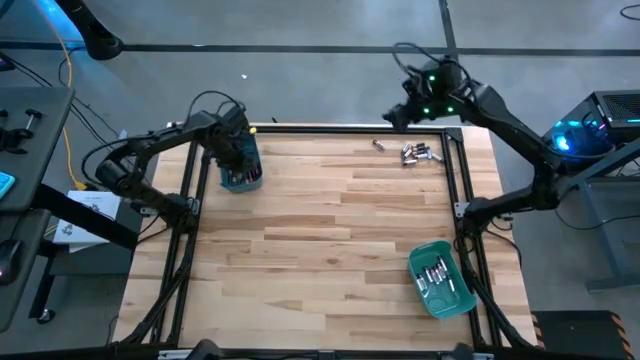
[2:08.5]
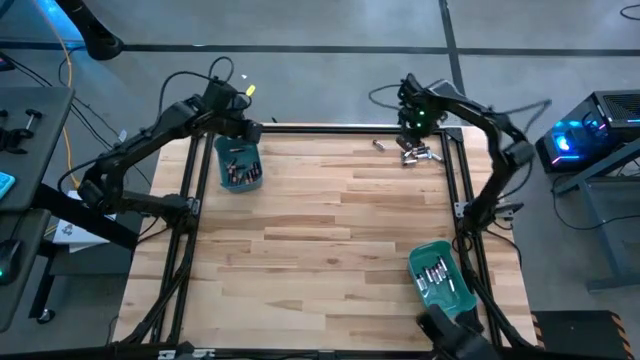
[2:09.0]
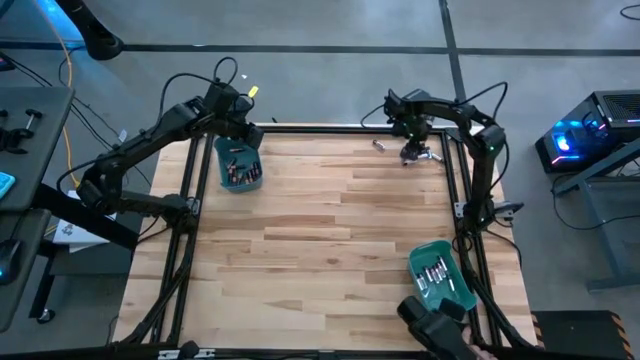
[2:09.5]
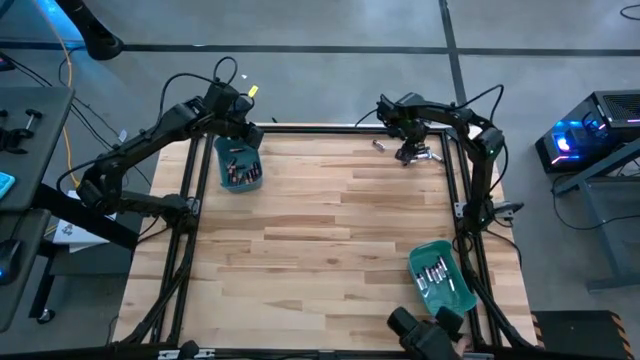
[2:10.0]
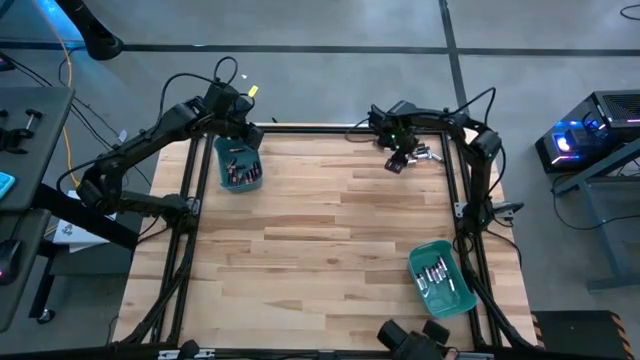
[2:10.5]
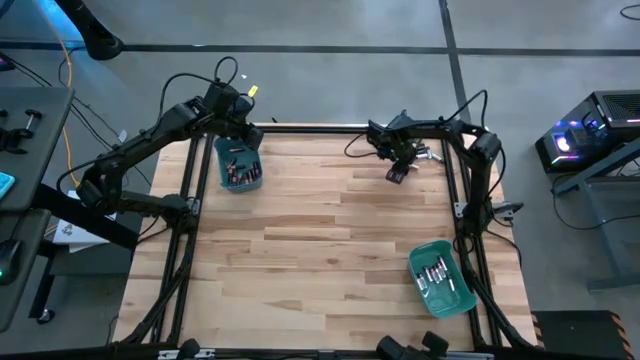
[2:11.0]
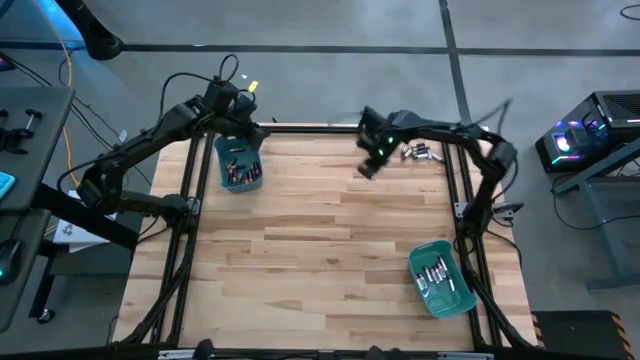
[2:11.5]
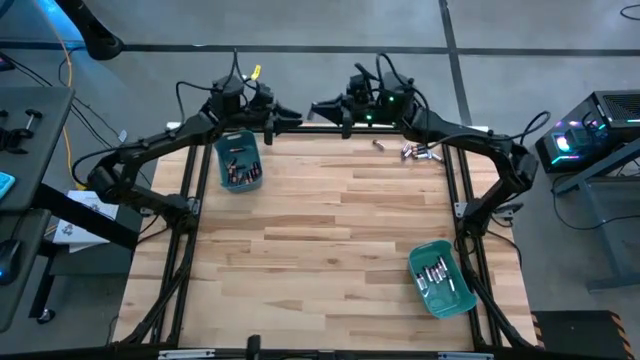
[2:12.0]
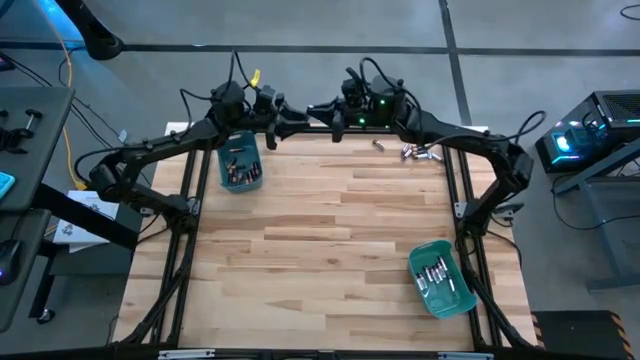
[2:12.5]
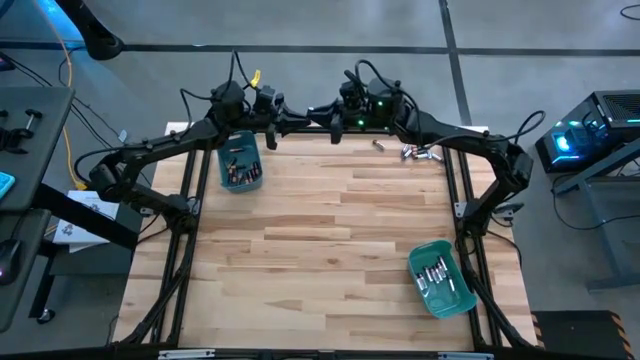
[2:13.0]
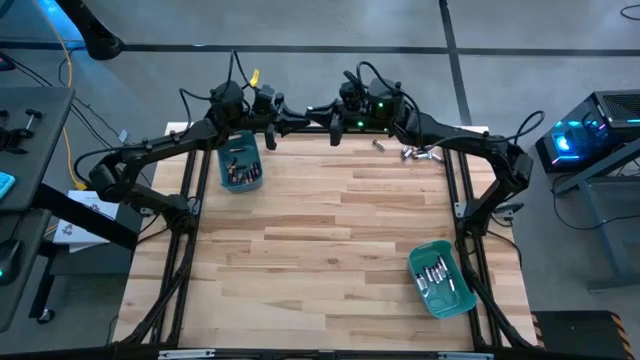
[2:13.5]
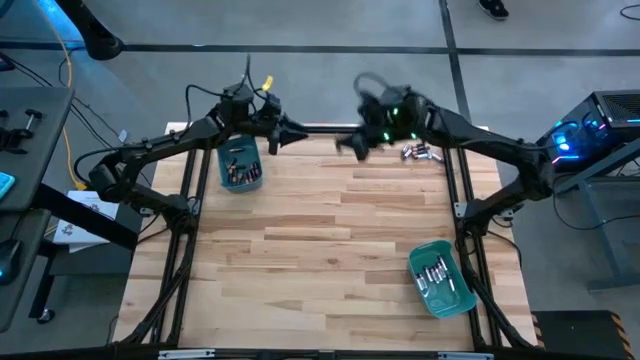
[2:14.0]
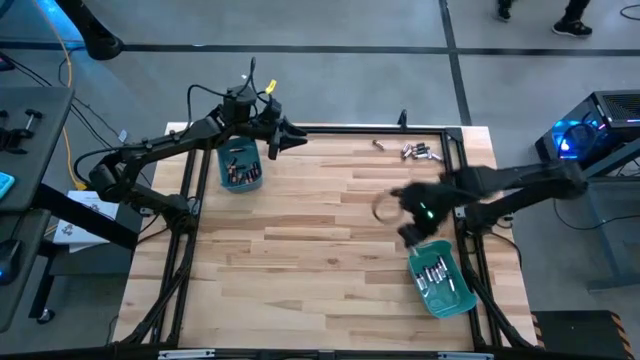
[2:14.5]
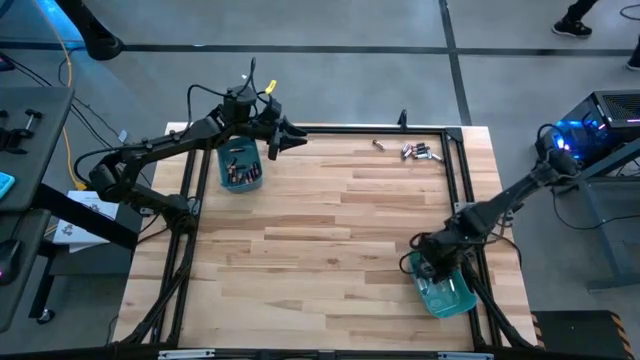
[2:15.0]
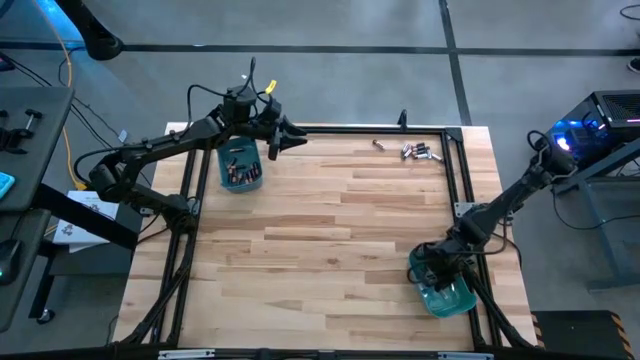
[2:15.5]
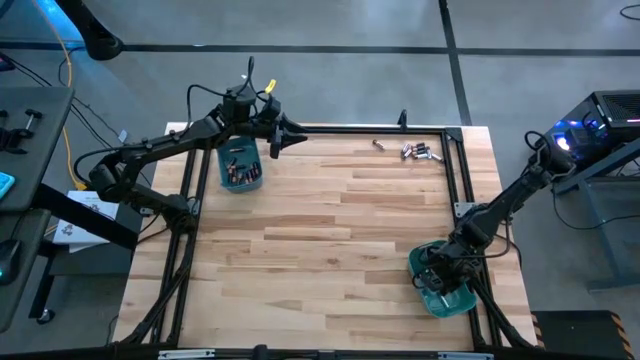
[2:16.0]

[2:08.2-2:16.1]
Task: Sort batteries
Put the silver battery into the green bin

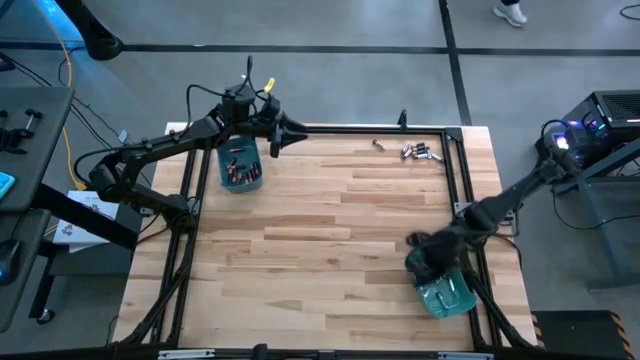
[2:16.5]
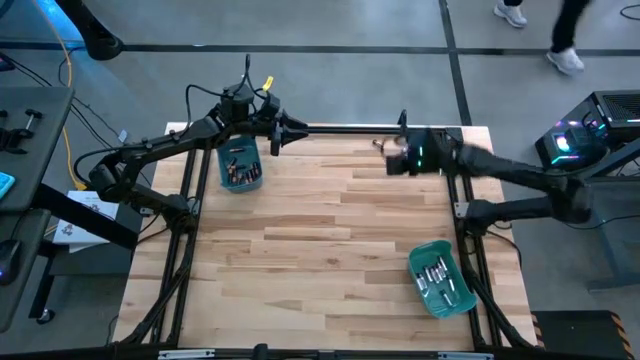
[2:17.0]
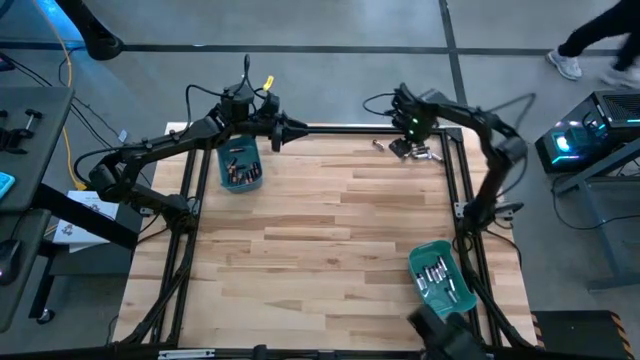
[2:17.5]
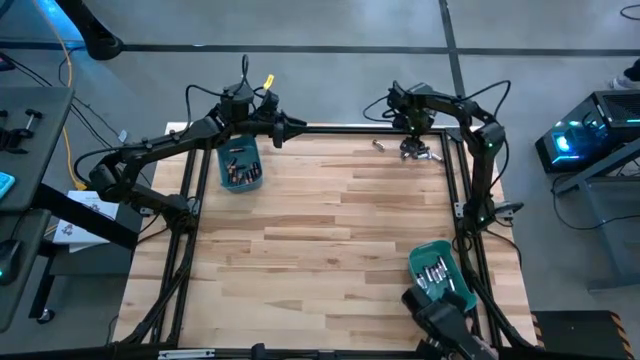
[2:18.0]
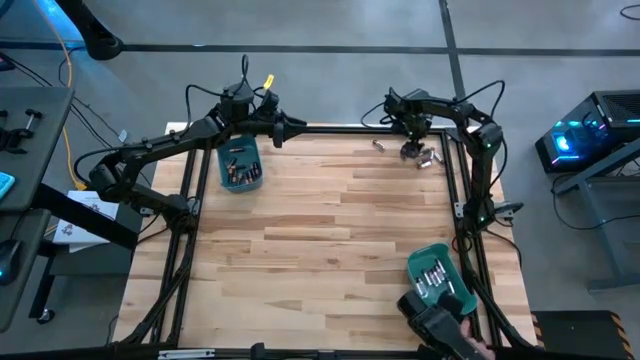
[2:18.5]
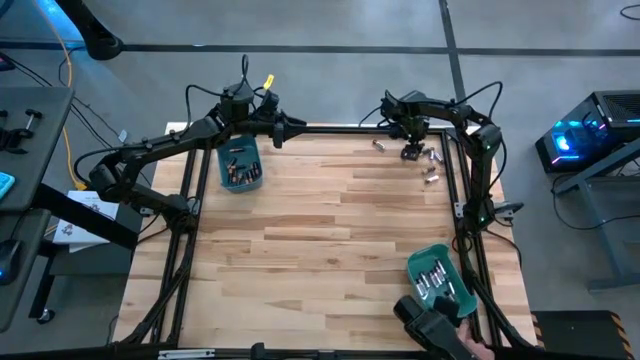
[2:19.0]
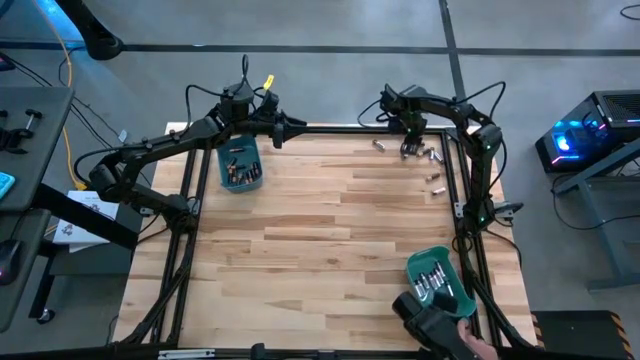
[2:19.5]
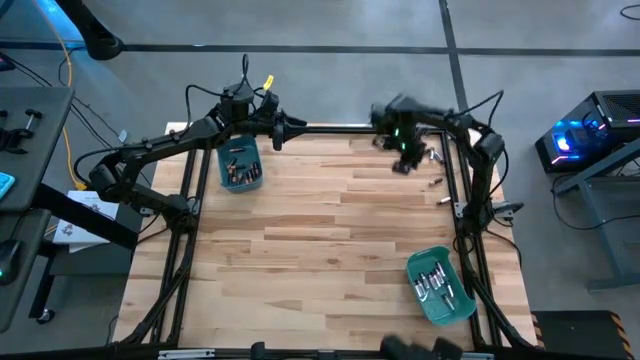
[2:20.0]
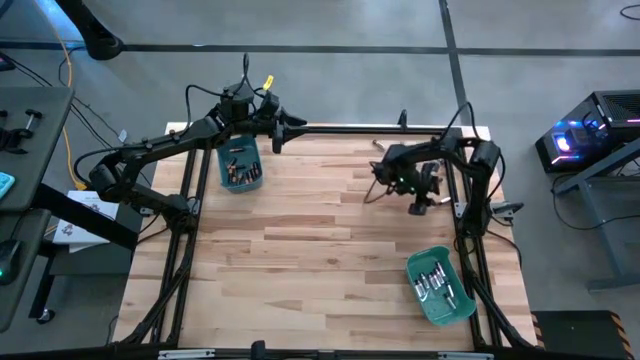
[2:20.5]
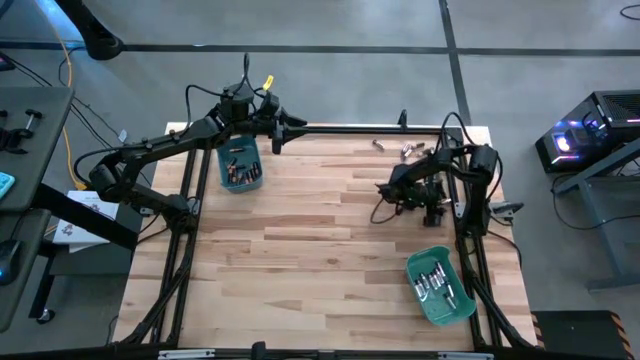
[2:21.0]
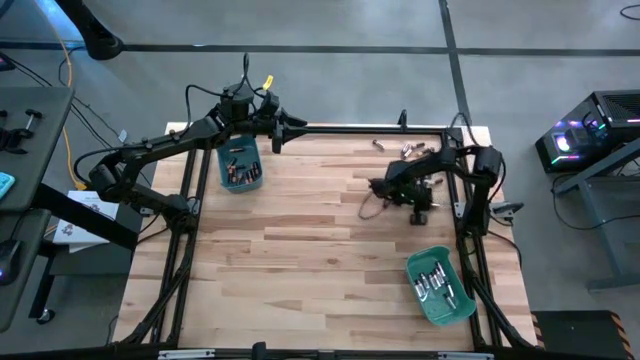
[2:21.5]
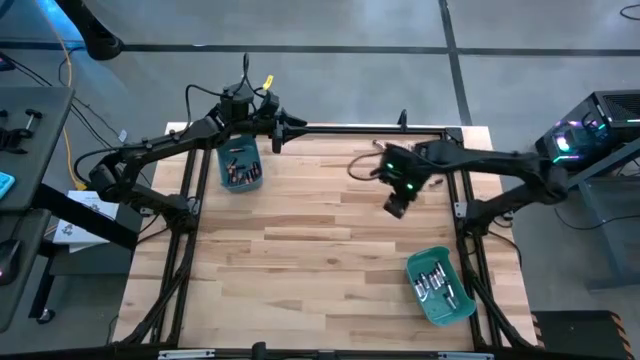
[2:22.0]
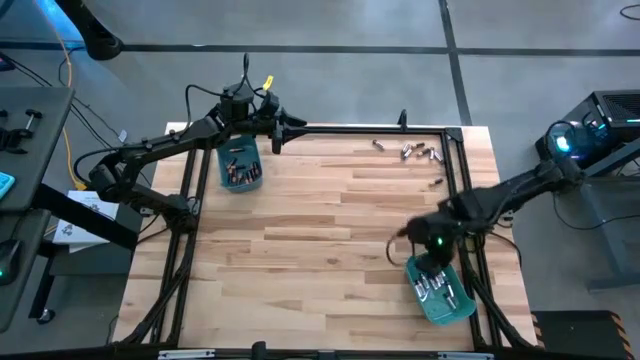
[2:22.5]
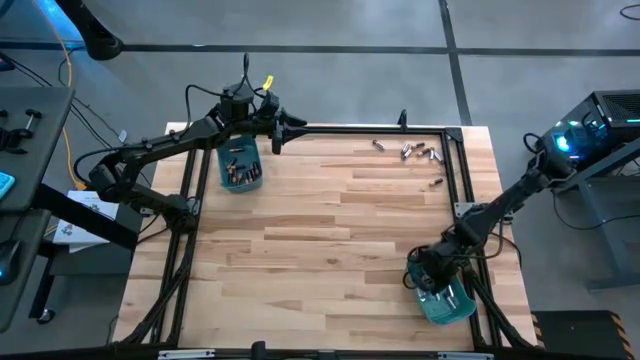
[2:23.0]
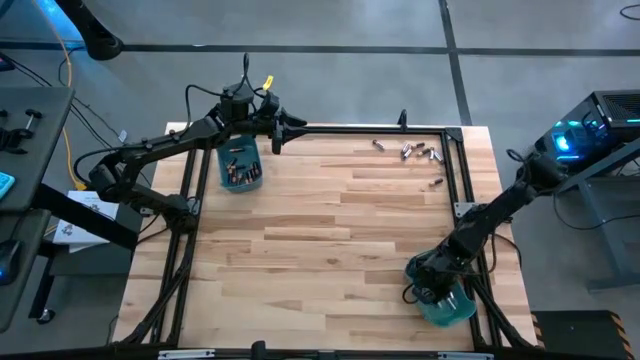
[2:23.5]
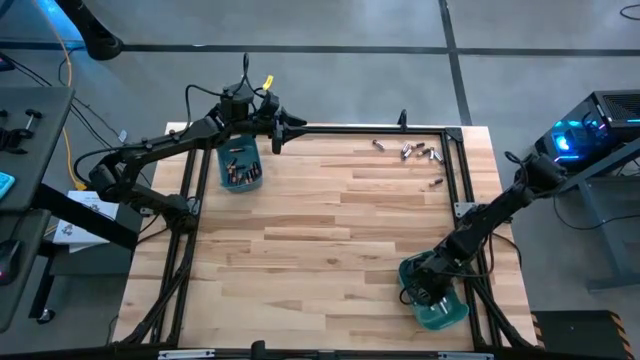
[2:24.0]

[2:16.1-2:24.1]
Put the silver battery into the green bin

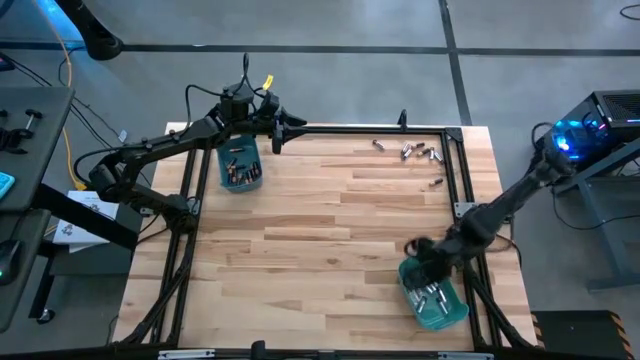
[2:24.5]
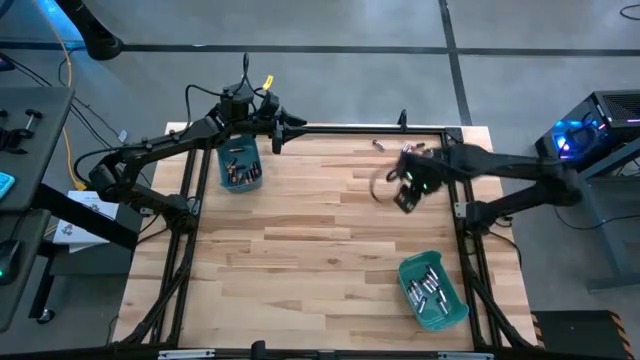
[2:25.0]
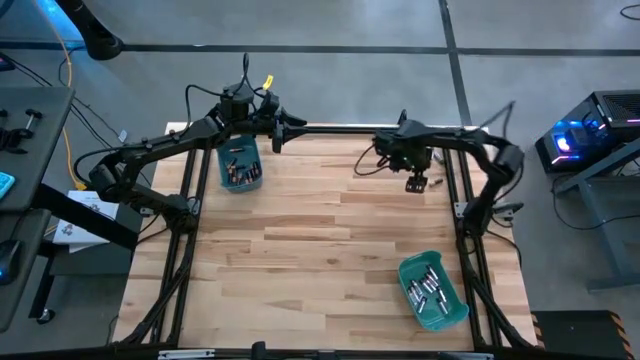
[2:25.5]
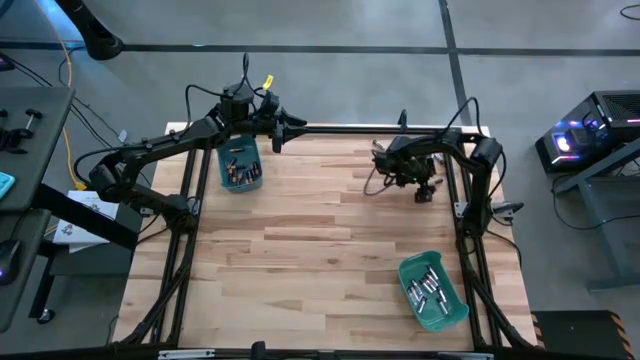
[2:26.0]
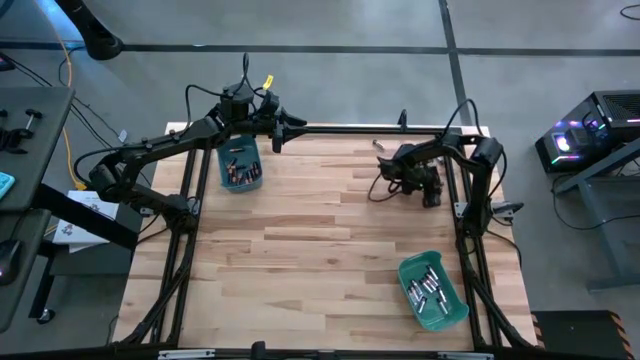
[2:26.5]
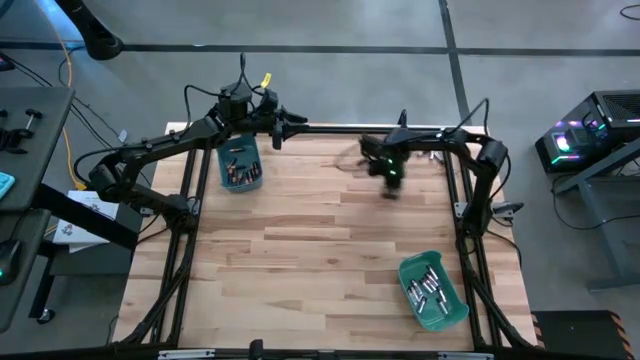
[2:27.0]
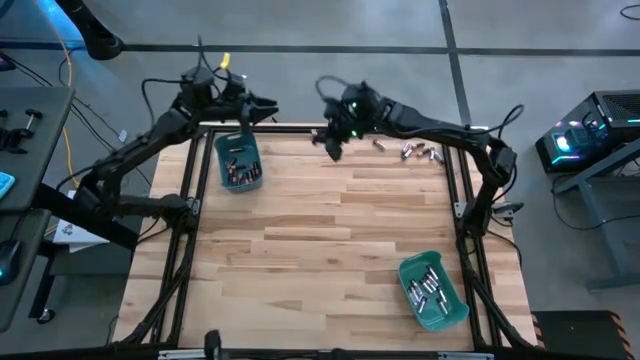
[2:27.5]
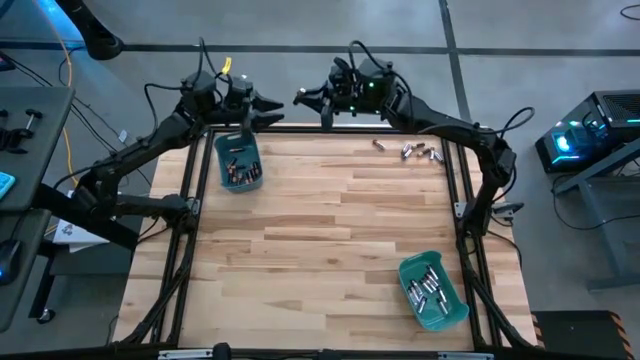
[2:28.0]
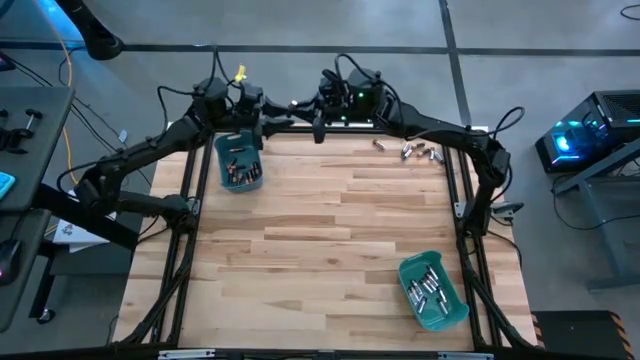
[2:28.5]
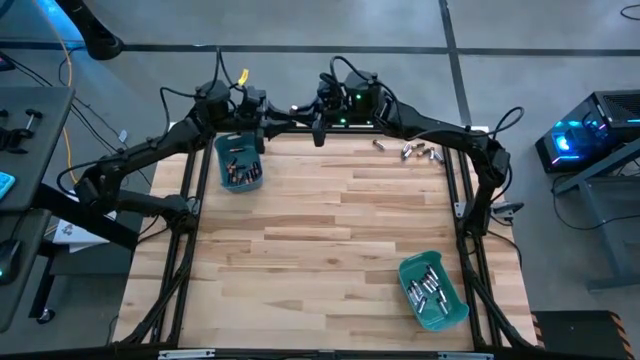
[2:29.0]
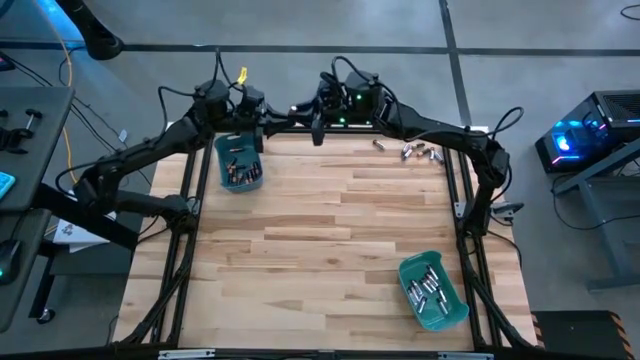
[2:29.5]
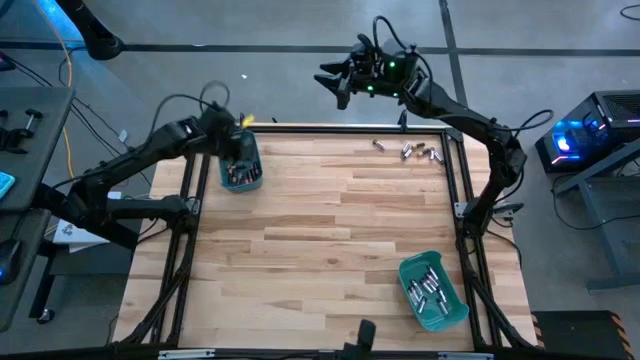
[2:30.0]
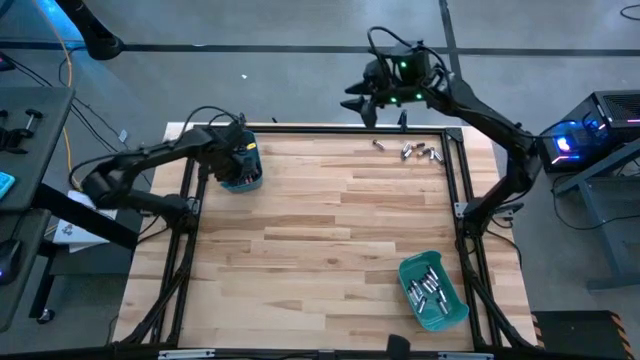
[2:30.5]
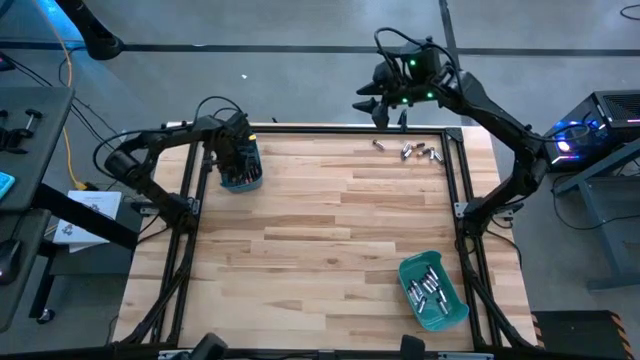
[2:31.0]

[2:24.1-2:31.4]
Put the black battery into the blue bin
